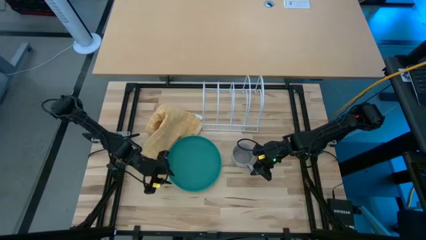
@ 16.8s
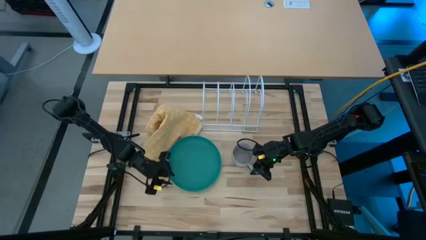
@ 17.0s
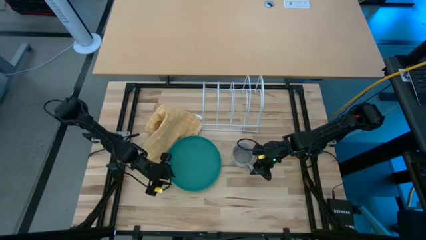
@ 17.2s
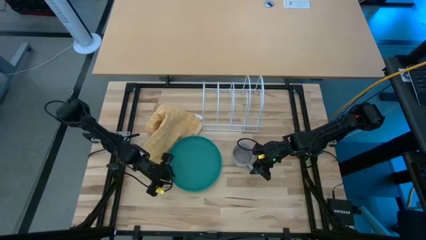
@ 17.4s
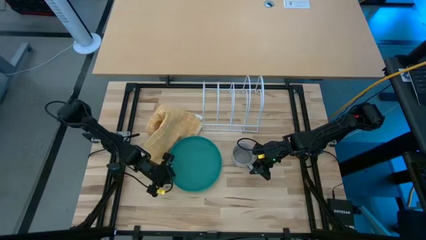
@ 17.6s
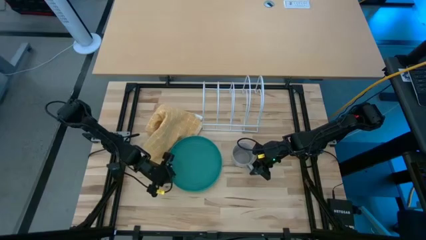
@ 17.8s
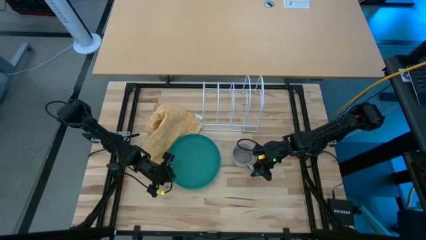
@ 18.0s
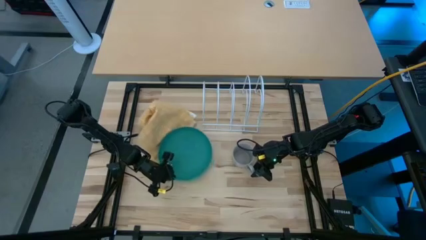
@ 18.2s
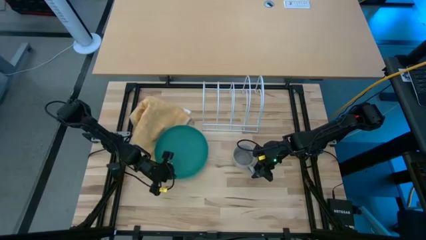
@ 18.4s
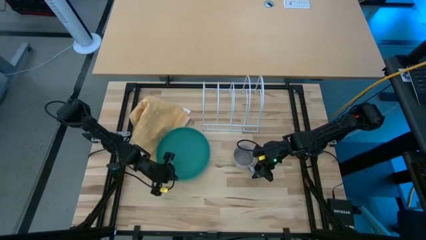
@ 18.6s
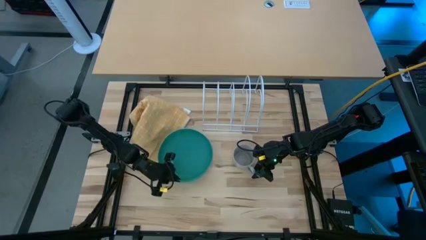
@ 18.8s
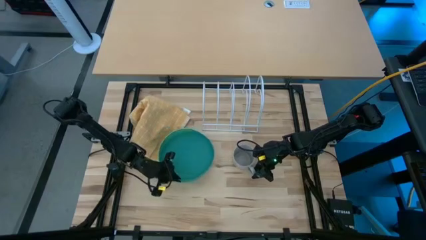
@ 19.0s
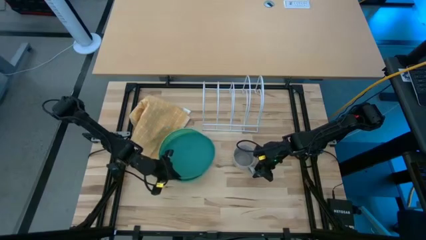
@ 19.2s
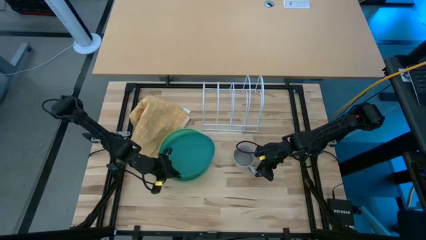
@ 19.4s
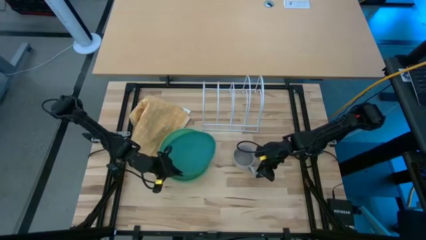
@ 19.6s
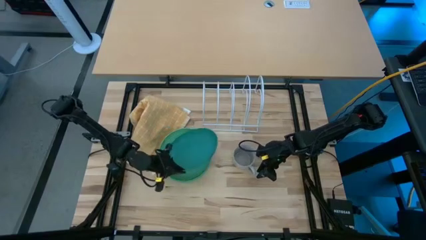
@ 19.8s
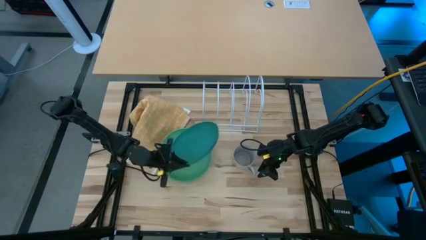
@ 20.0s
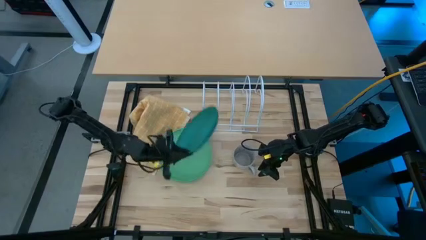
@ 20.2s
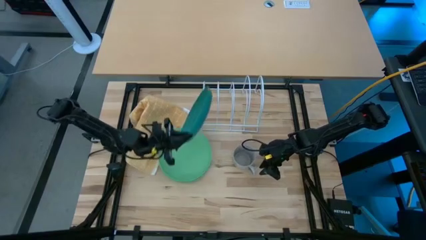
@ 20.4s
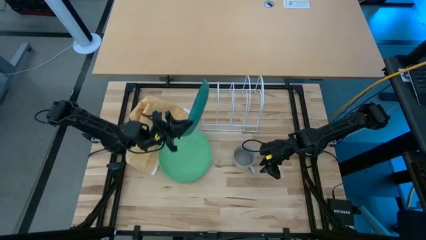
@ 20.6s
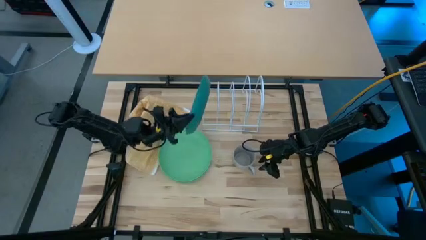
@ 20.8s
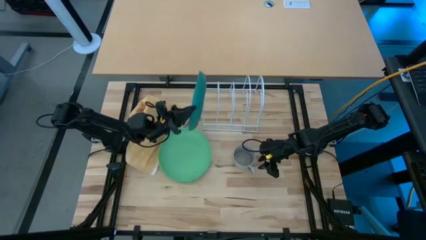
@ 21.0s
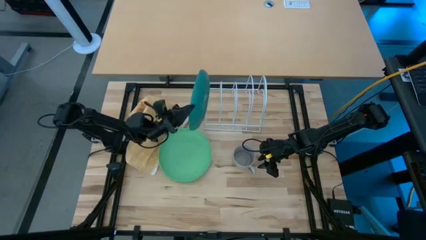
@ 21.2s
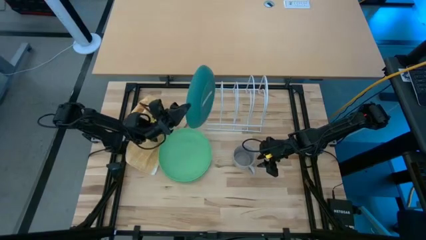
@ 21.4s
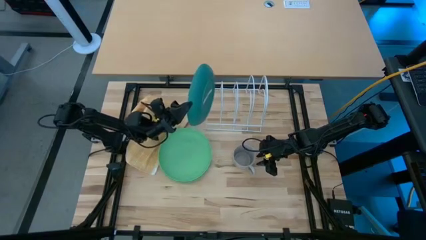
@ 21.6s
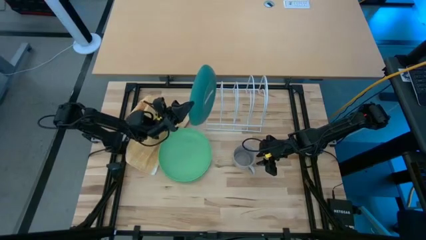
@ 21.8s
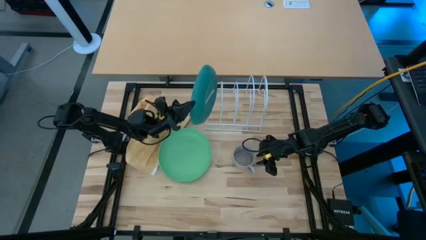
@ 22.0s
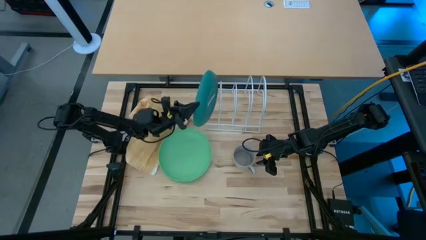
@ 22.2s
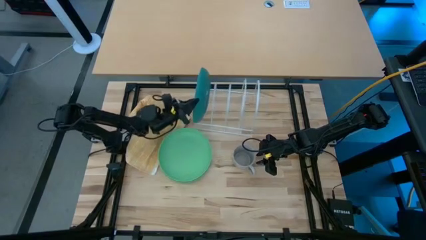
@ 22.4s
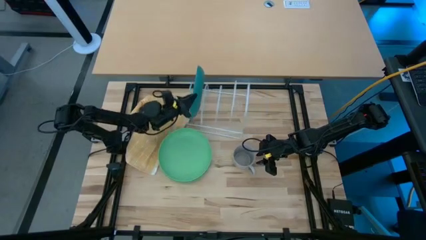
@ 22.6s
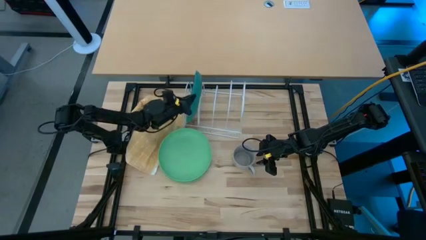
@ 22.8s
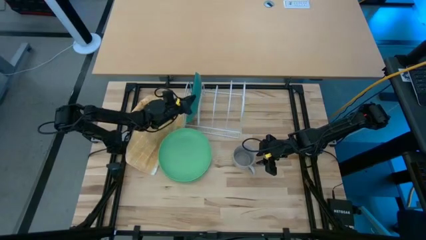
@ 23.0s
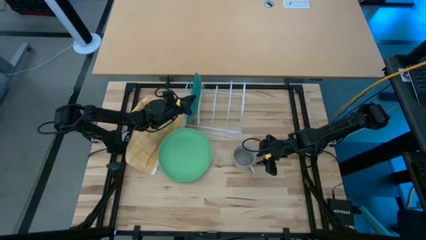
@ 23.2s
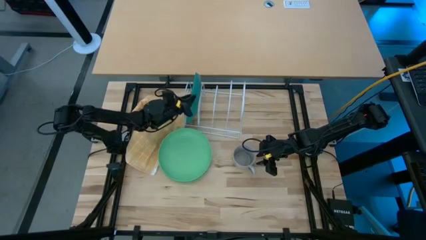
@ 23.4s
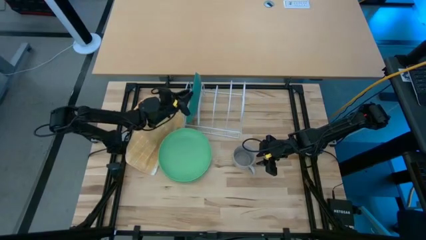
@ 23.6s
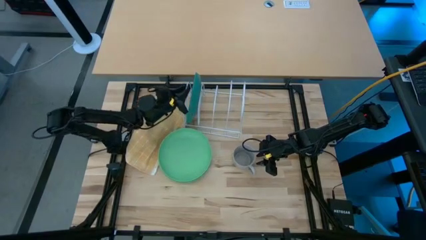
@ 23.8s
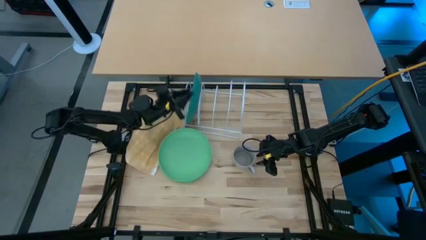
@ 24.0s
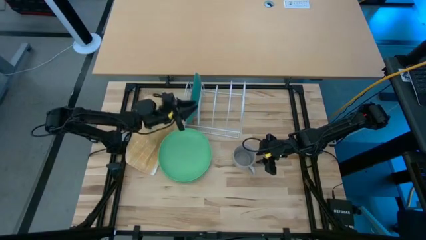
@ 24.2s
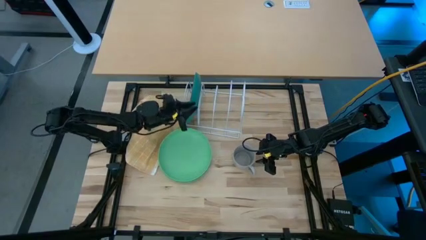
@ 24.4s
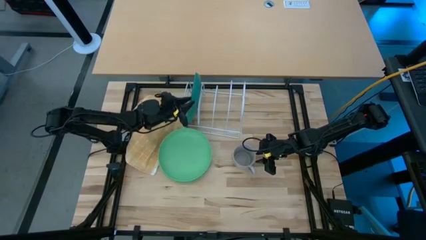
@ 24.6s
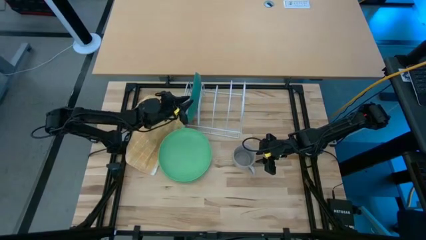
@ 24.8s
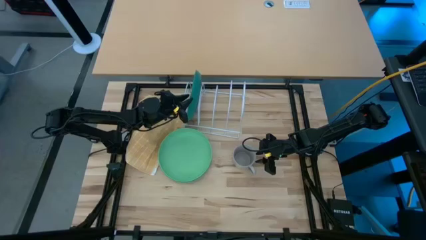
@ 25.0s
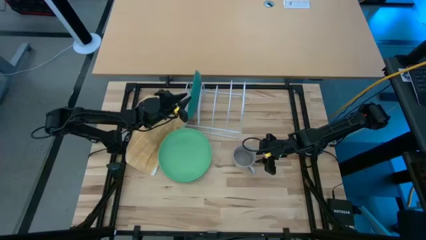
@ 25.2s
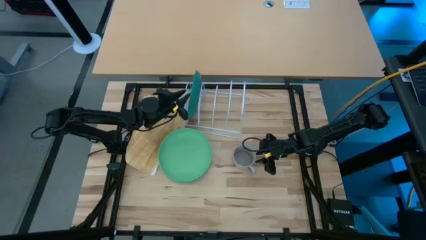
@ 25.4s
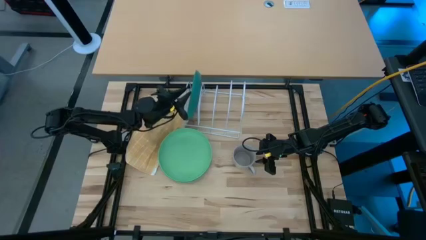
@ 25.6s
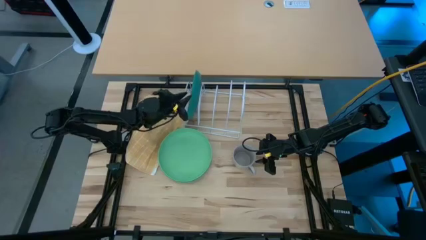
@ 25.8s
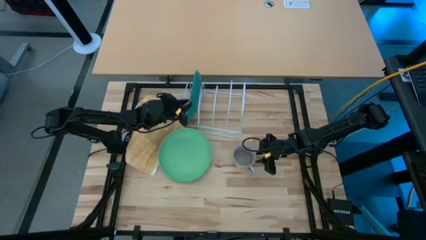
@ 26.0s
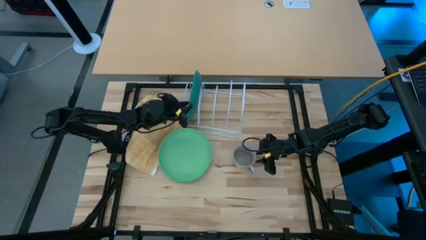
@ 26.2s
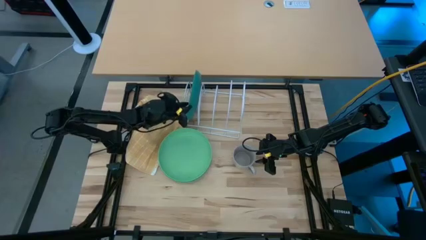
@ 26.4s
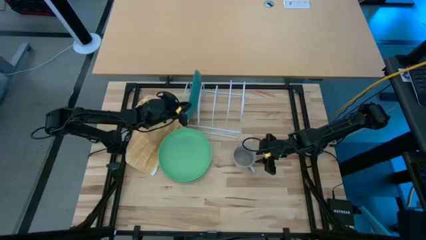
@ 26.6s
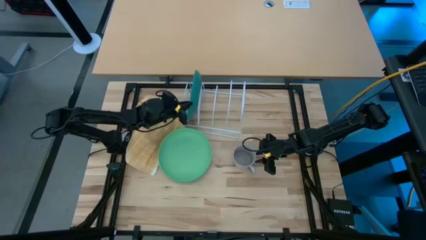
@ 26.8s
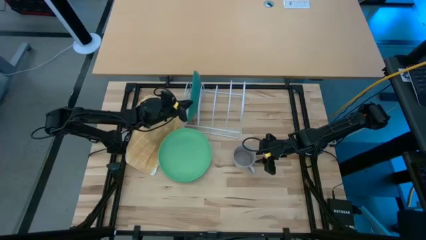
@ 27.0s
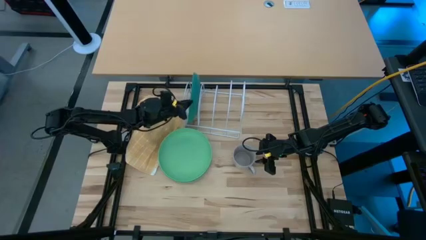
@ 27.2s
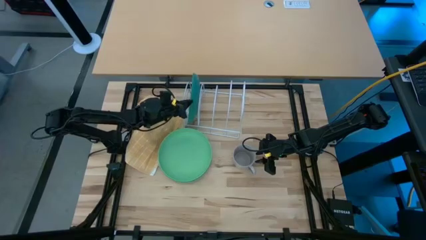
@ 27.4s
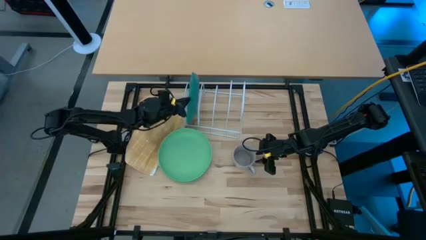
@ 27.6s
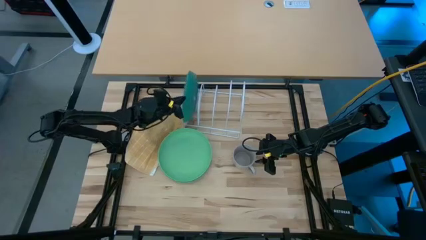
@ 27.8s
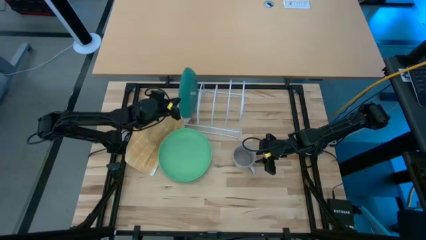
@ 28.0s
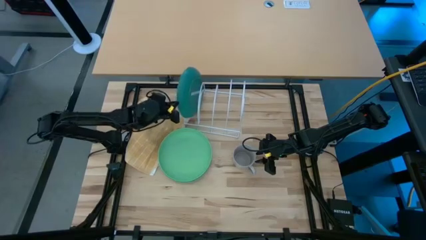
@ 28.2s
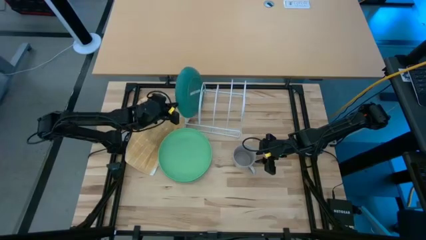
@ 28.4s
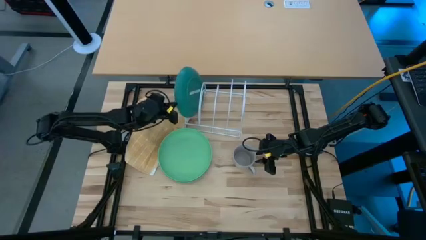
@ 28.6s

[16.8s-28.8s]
Task: Sort dishes
Put the blue plate into the dish rack

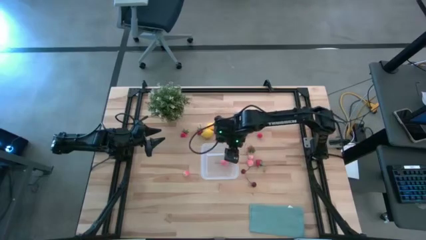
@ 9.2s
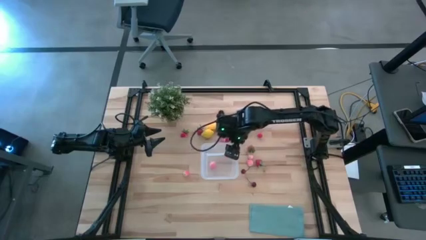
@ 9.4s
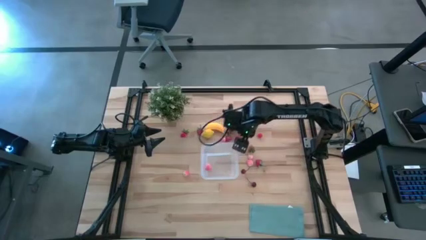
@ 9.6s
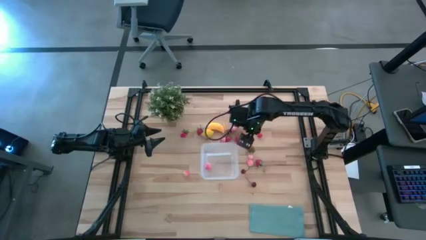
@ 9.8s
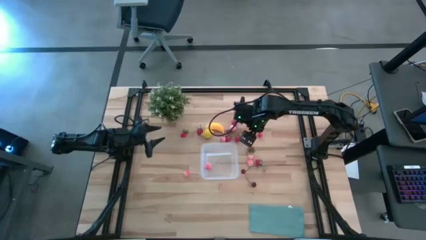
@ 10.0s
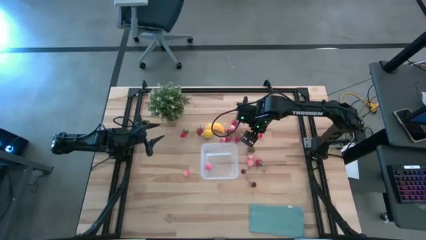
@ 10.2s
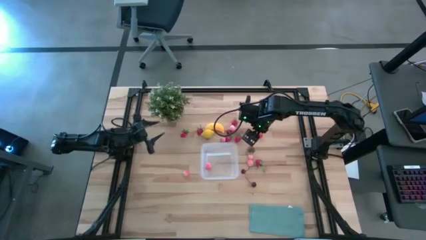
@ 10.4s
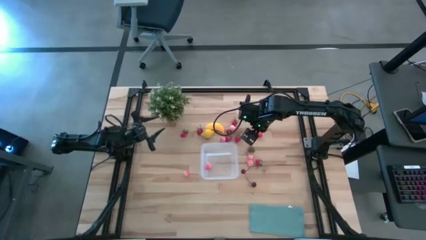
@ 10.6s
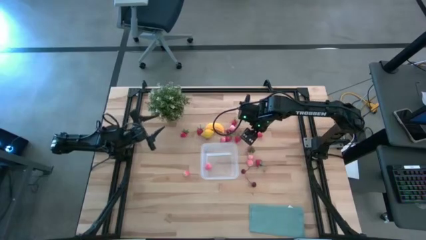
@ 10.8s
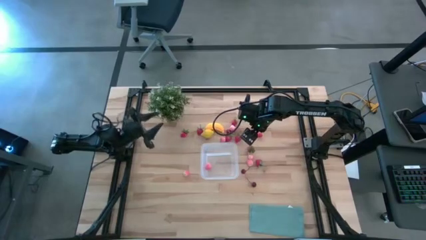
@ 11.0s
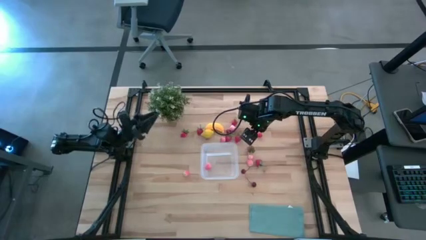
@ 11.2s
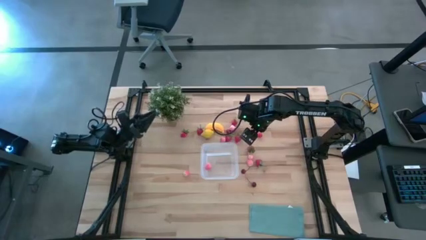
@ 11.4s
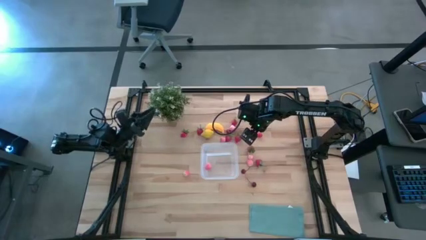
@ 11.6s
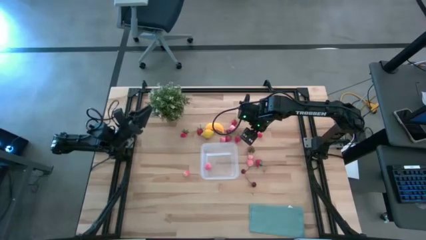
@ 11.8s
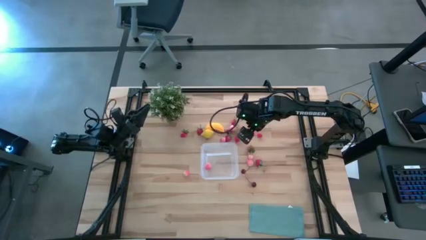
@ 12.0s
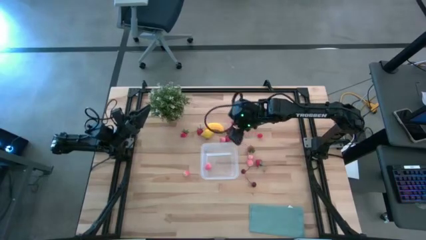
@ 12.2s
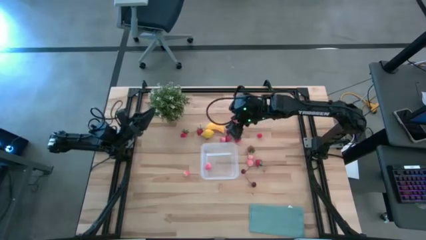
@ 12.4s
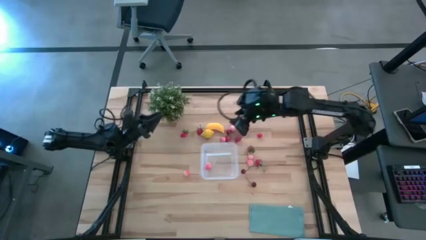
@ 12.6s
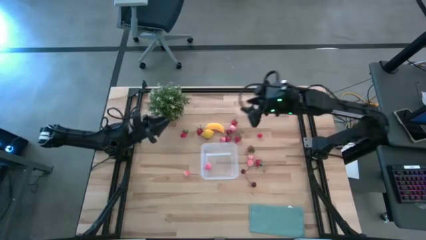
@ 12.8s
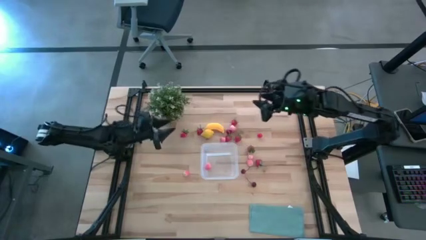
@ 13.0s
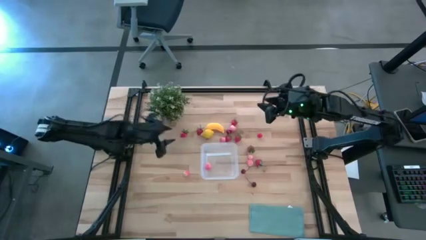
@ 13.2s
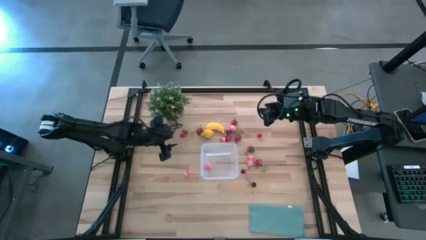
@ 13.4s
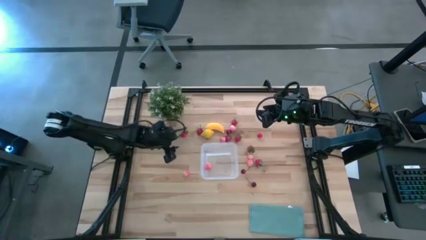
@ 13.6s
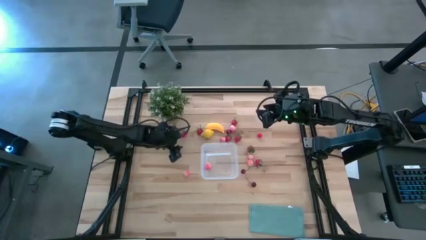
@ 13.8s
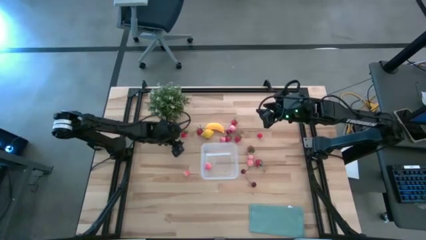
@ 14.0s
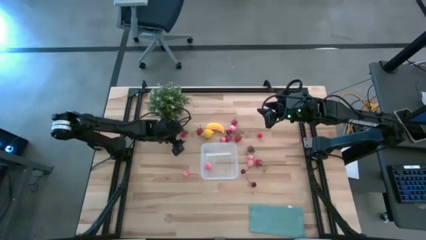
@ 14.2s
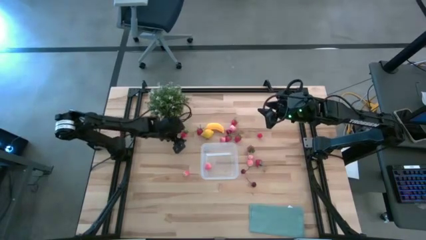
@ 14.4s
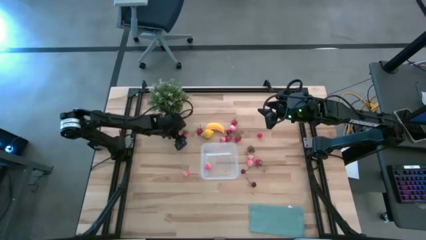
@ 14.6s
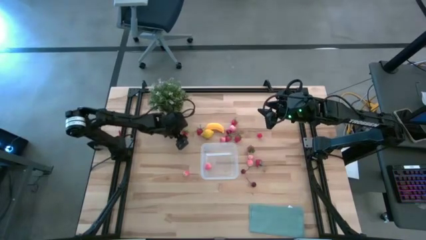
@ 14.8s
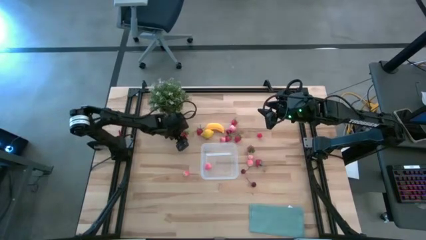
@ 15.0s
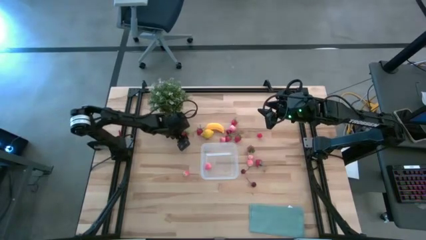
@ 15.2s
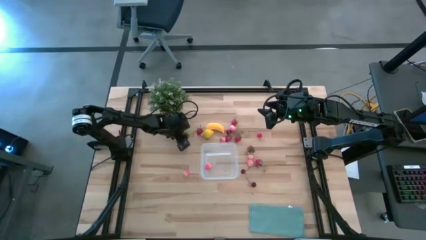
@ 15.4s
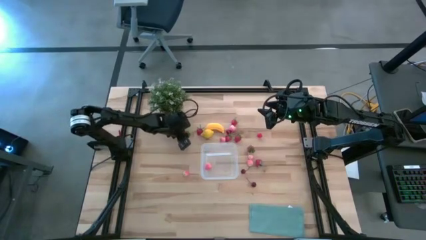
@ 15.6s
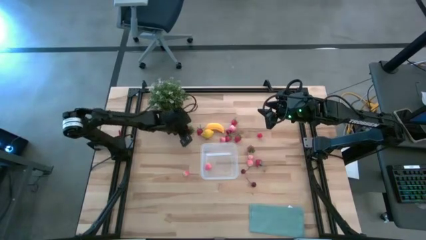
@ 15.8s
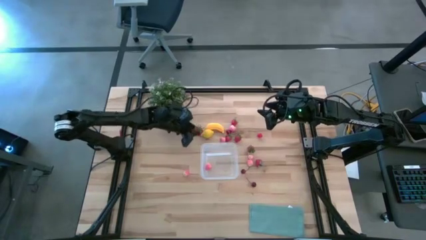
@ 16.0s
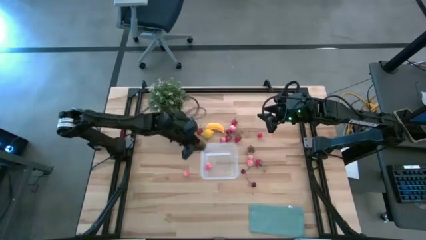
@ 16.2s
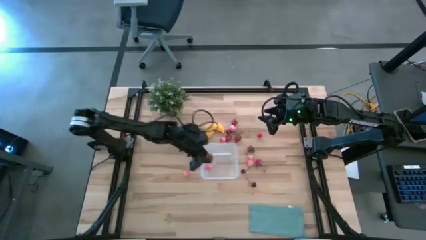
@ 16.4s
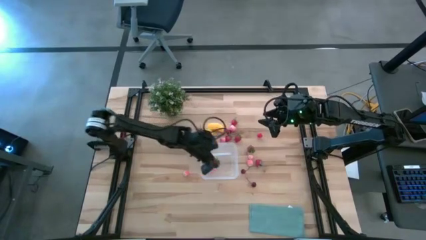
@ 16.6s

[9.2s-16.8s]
Task: Pick and placing Produce into tupperware
Put the red strawberry into the transparent container
